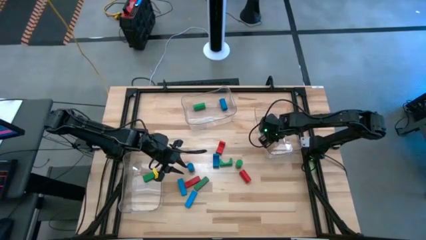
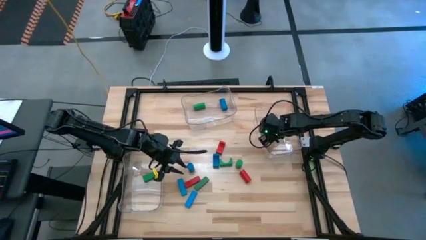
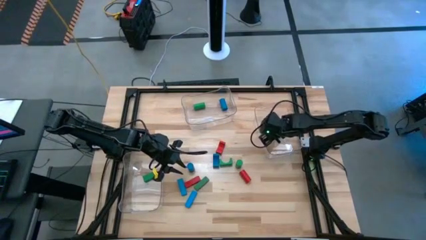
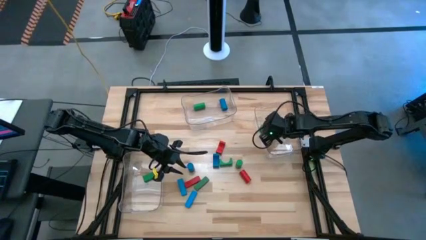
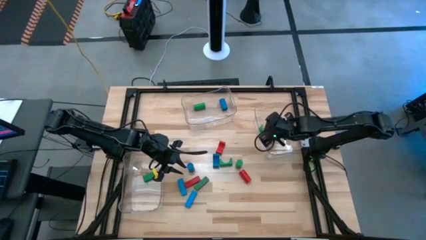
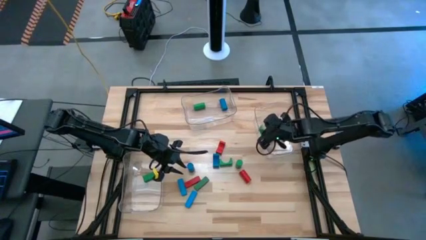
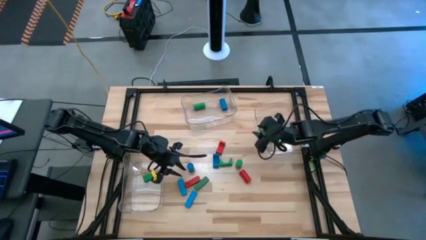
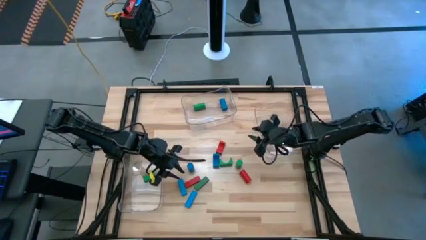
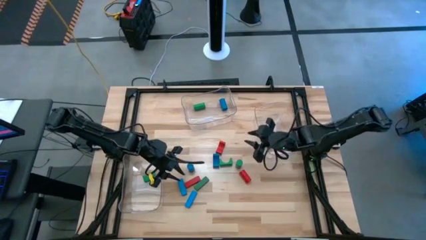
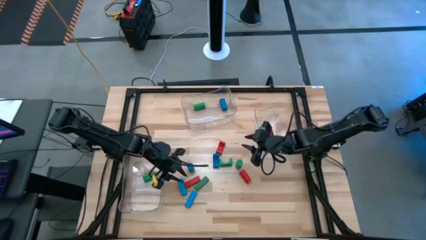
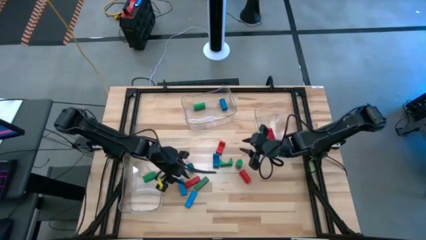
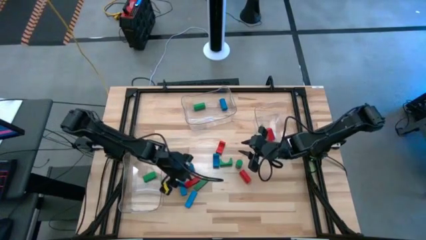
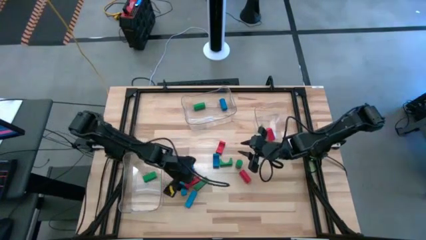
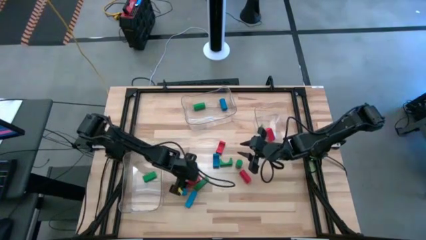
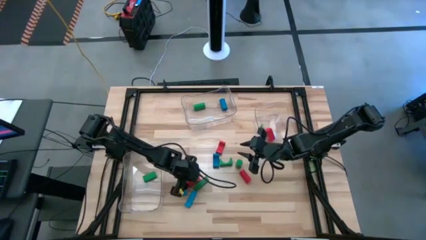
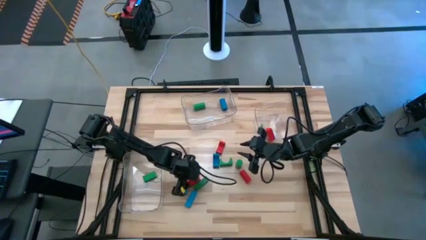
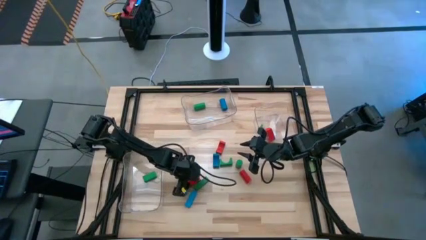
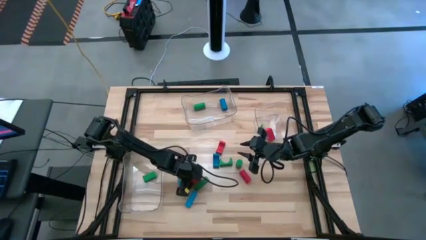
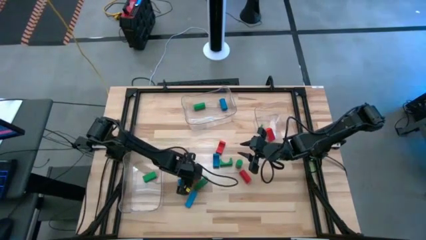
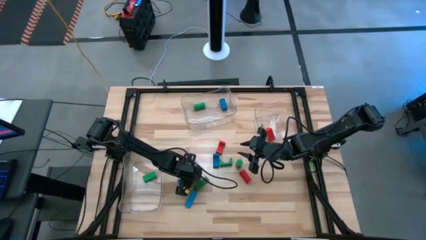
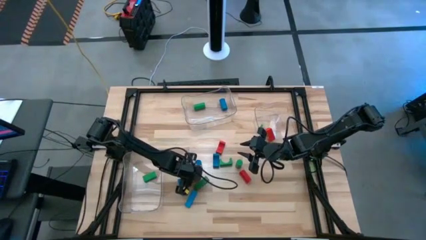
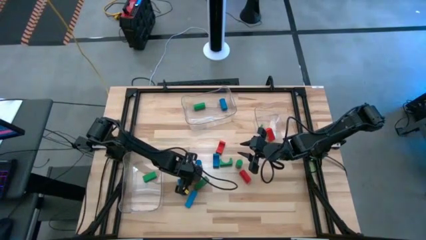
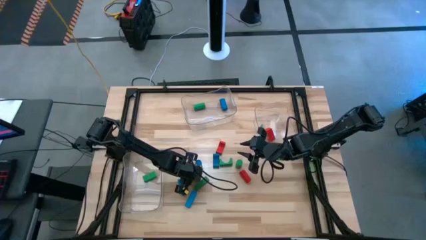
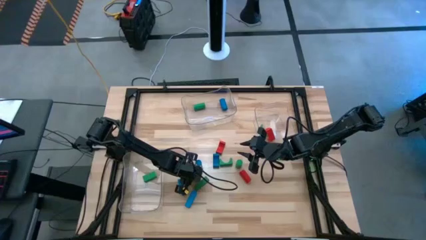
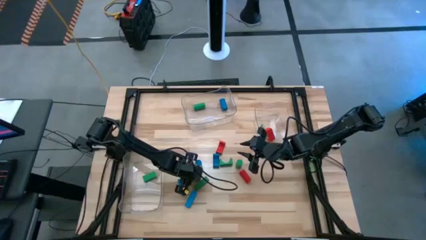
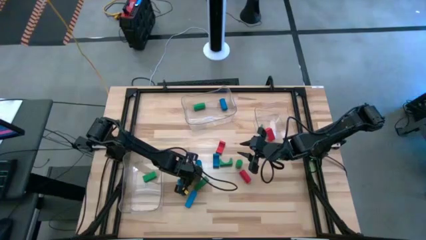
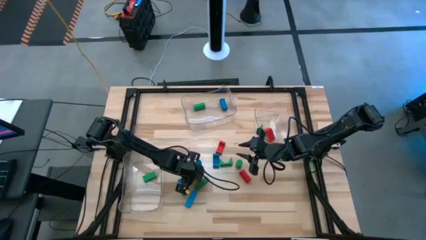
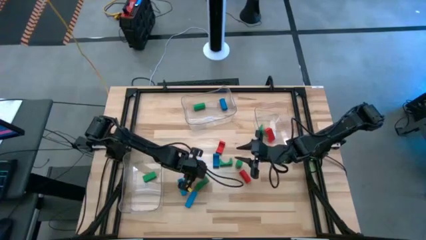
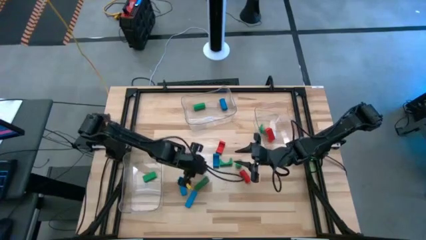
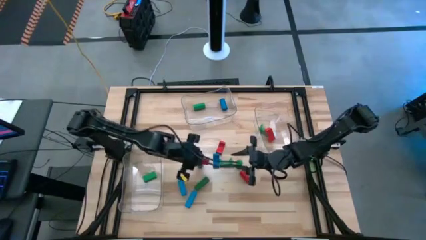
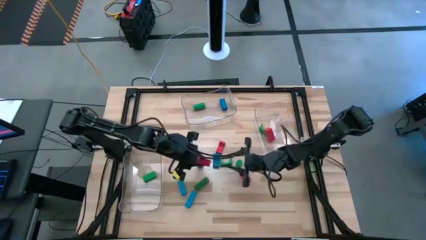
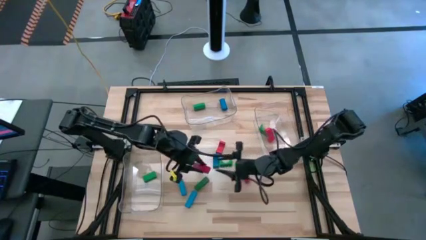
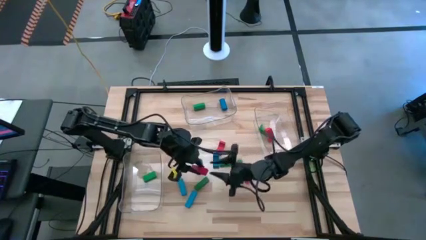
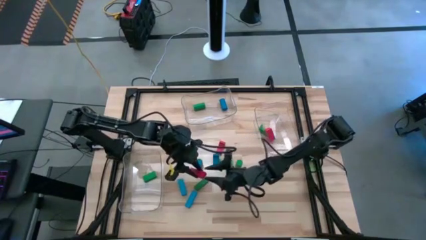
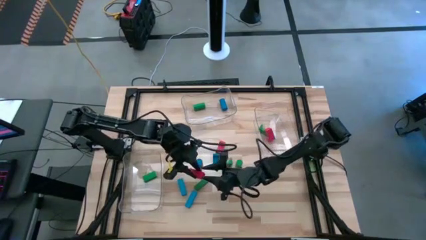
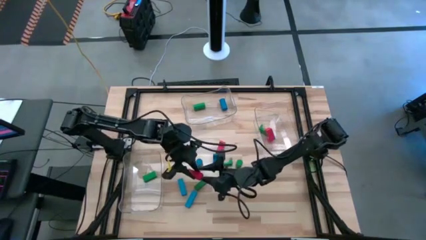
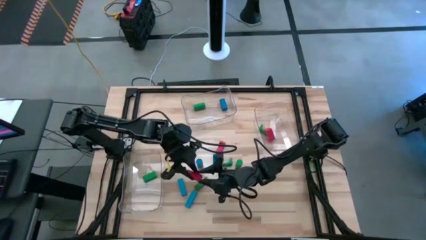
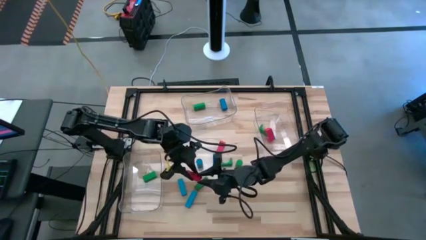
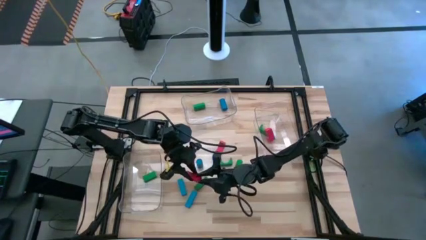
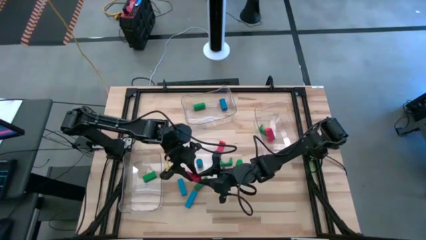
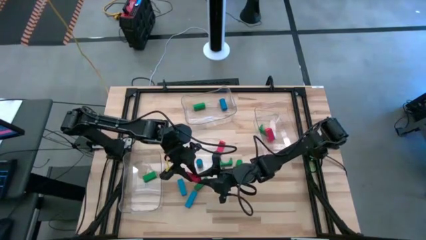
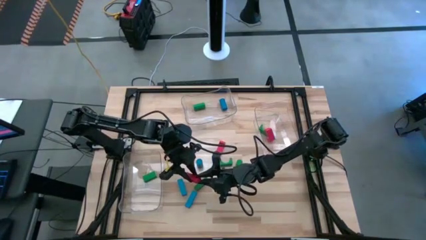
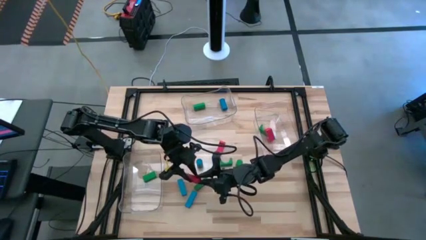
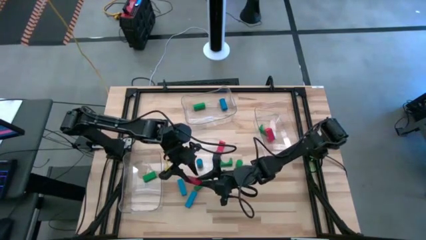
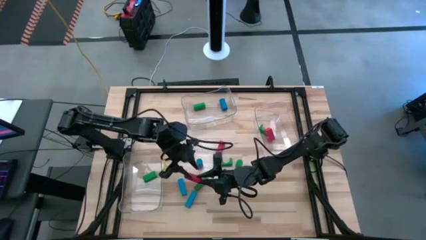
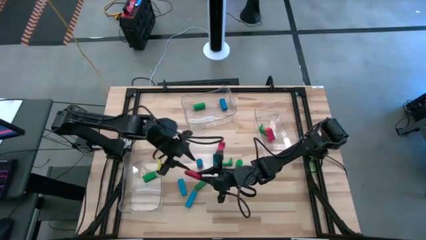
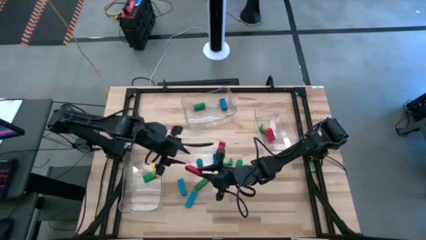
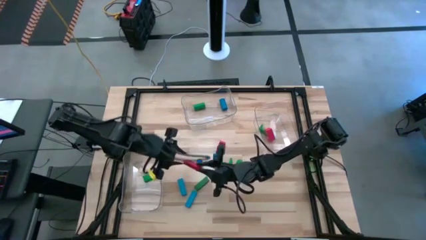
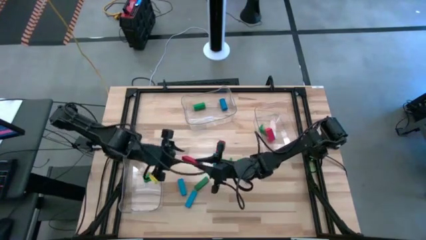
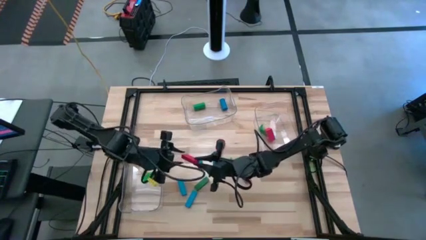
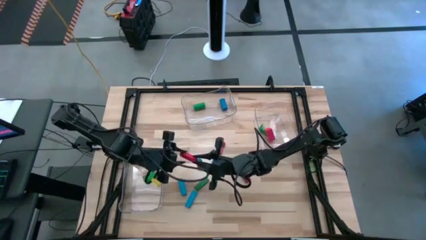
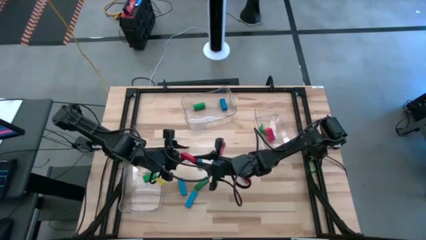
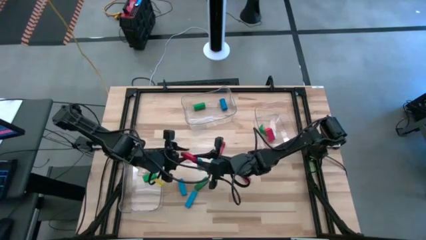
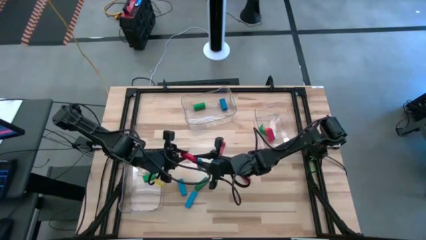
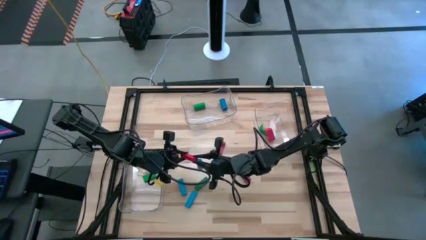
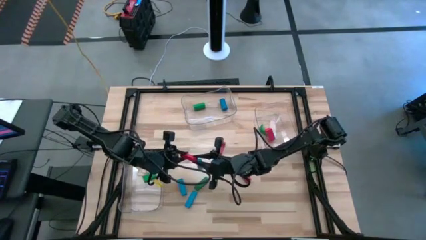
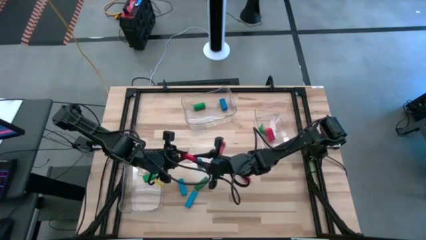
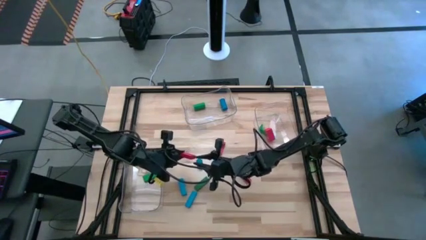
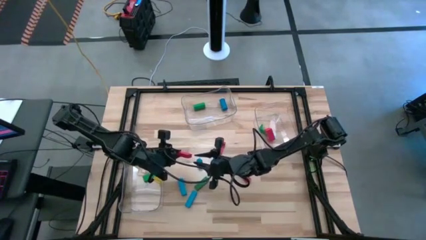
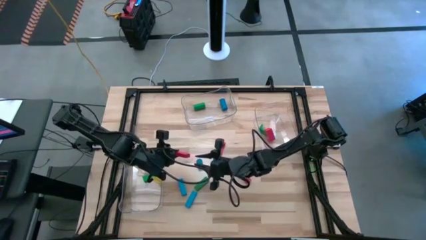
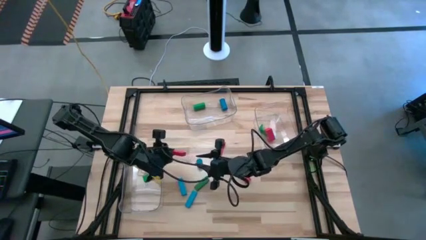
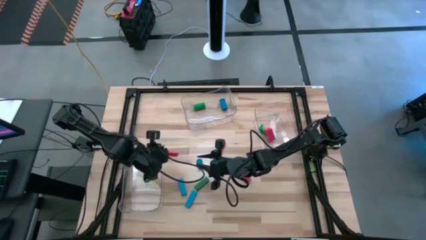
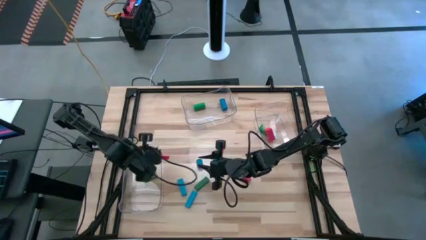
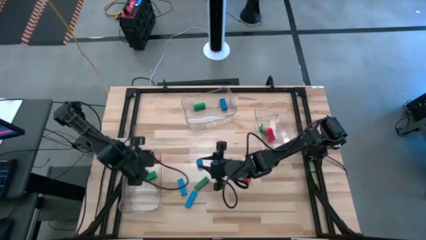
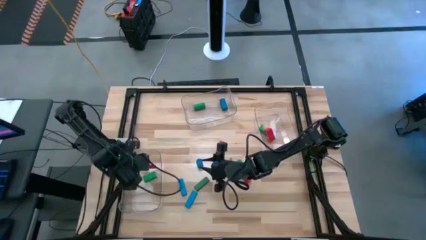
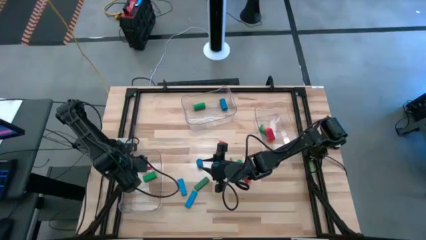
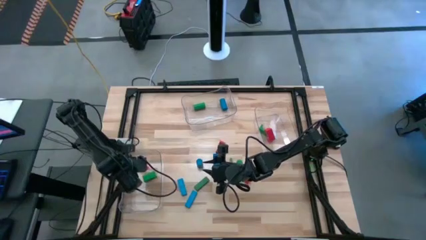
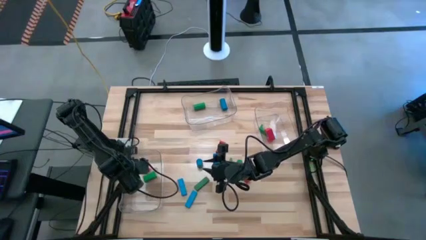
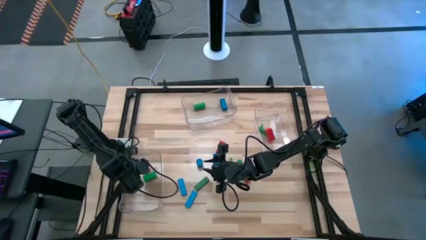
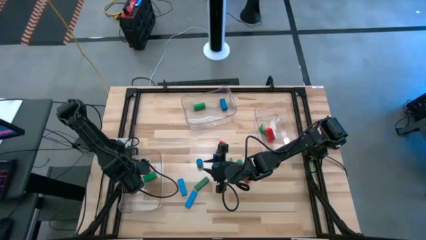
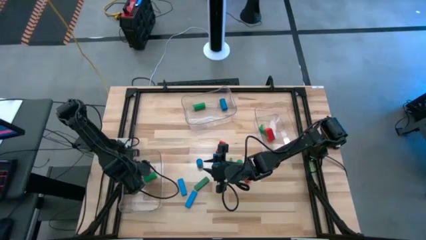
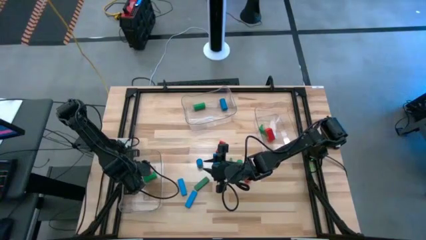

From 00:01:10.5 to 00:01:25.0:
Task: Sort blocks by size
Put the red rectangle block into the left transparent bin
